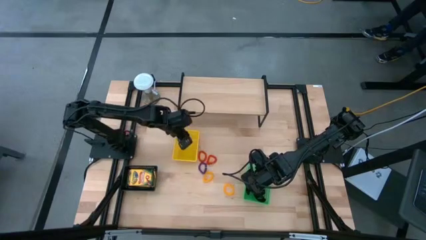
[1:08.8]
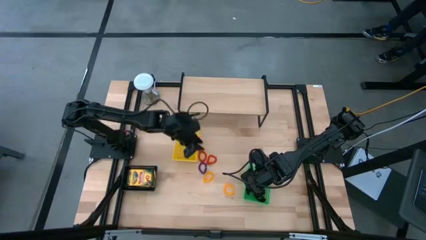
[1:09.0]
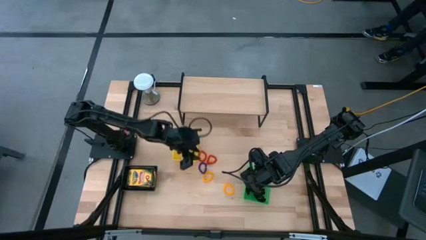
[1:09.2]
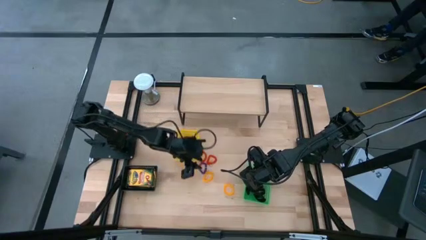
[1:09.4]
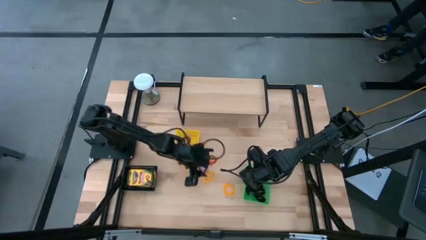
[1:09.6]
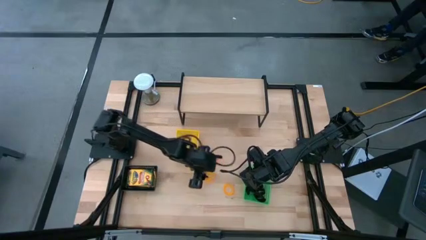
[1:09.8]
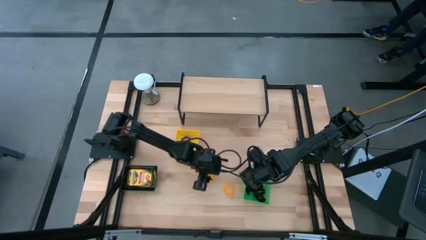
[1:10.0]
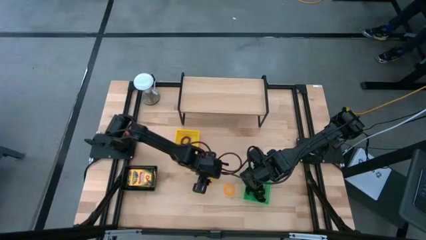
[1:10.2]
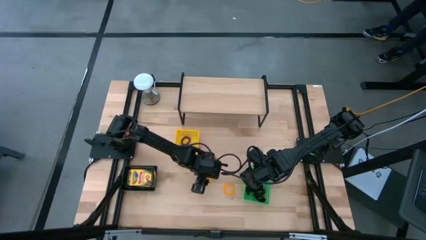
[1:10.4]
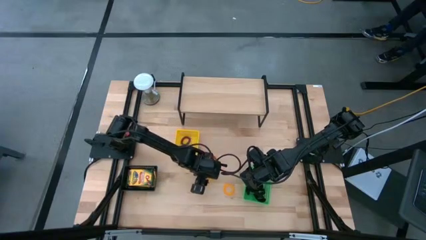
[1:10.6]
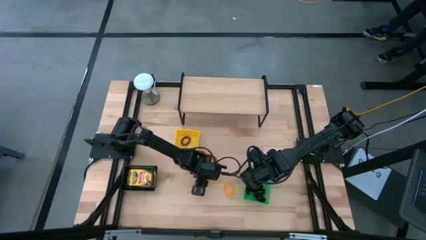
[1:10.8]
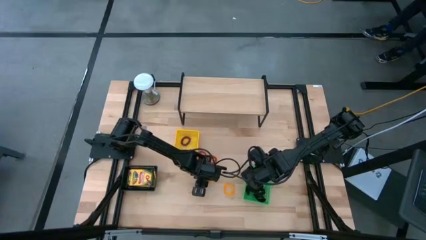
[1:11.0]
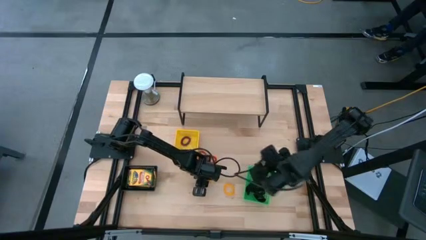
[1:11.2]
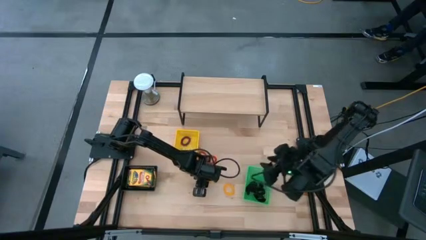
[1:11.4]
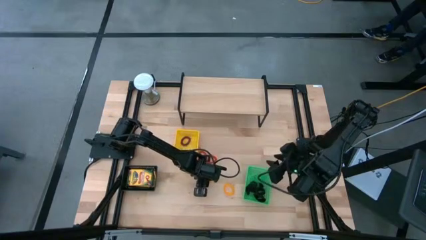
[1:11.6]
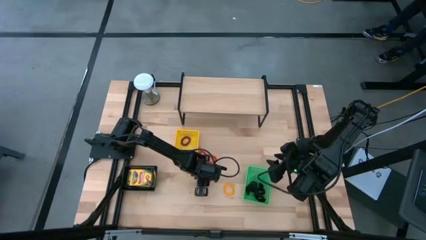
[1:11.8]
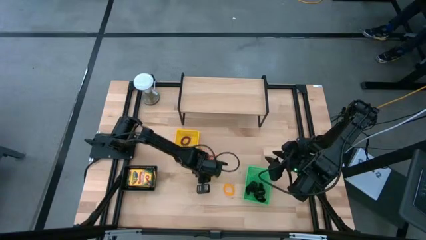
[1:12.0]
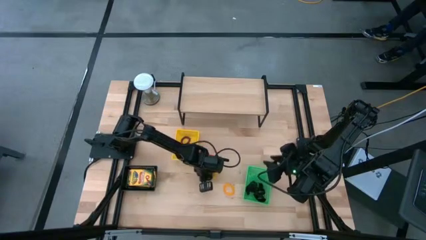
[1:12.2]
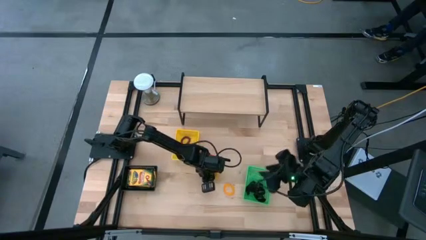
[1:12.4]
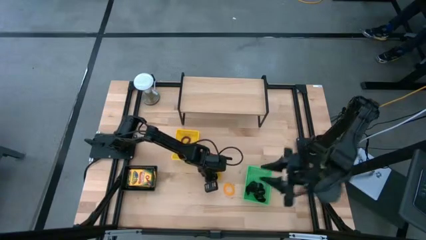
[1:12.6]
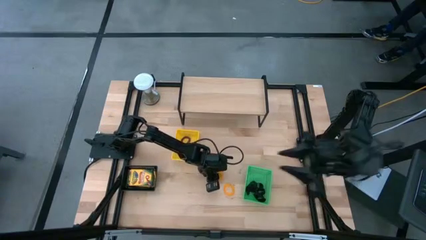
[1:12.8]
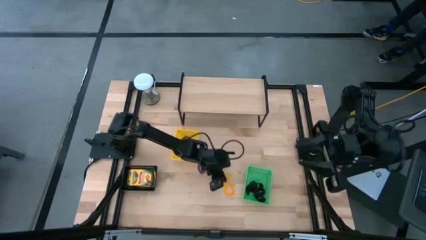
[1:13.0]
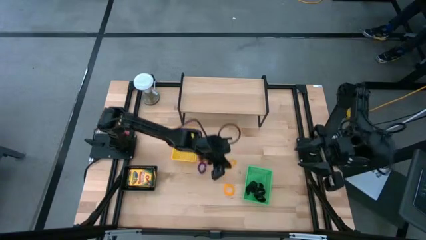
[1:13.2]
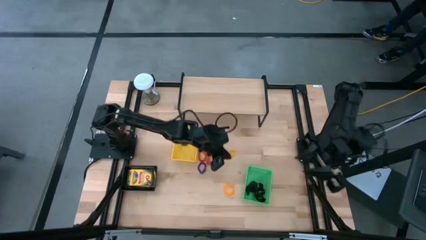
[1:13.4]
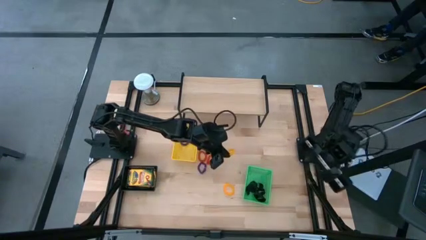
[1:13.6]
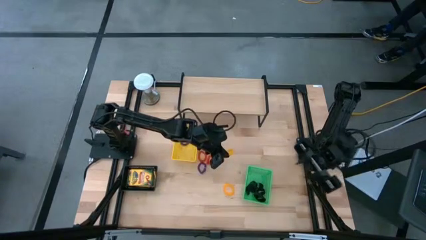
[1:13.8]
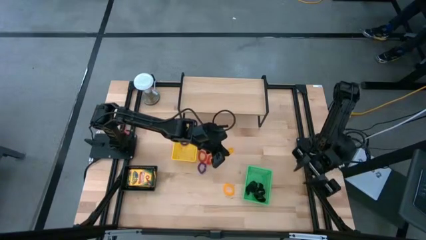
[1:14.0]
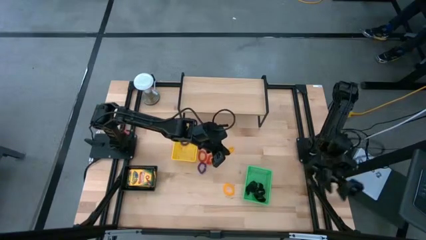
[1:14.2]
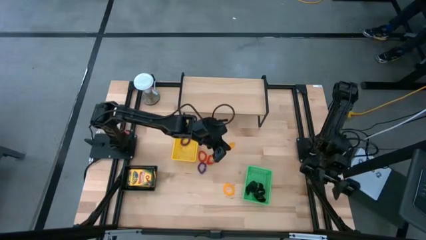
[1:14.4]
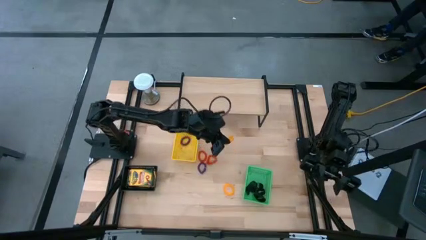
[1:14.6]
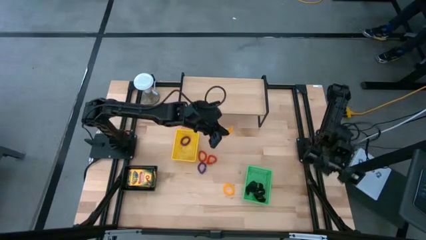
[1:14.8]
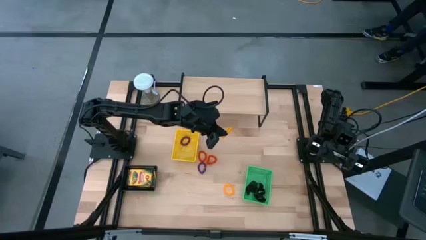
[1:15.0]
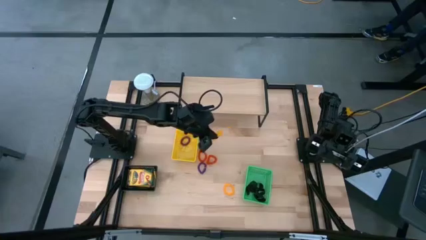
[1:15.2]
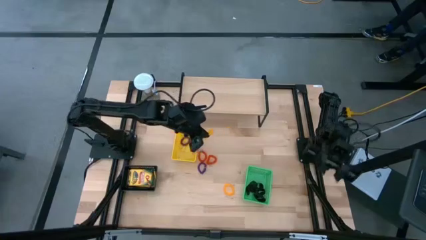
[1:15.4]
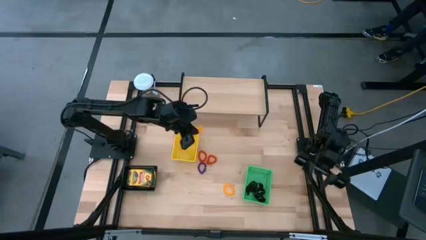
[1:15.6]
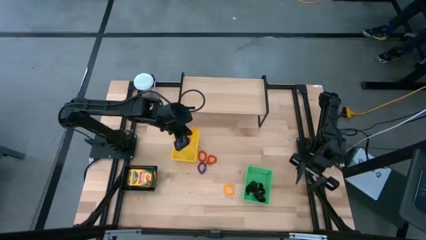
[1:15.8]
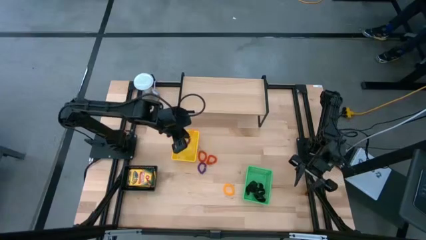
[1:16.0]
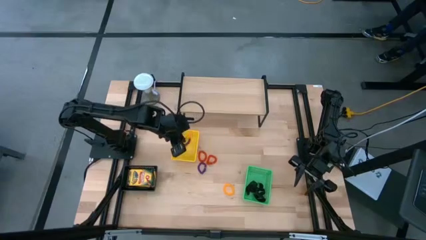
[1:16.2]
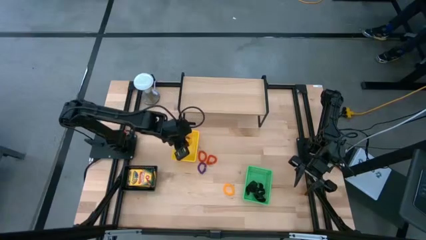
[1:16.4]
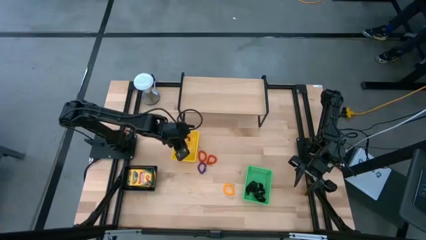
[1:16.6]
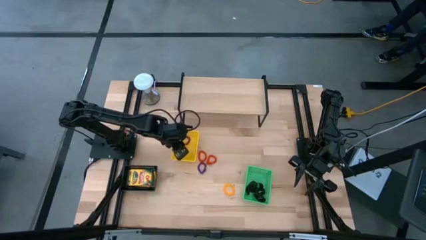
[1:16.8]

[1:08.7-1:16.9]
Task: Pick & Place Office Desk Supplies
Put the yellow spring keychain into the yellow bin

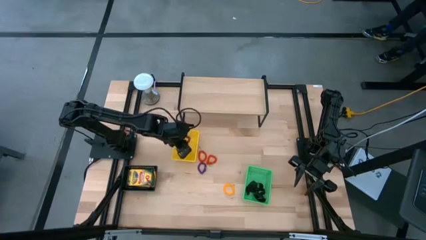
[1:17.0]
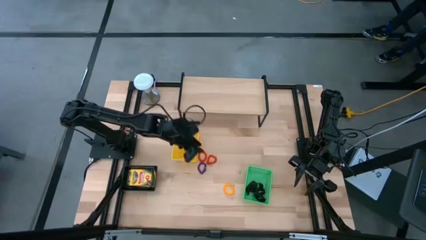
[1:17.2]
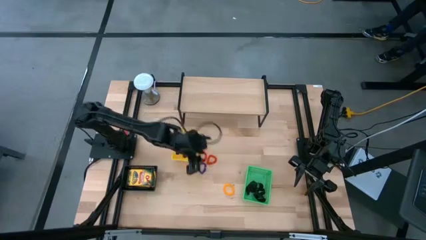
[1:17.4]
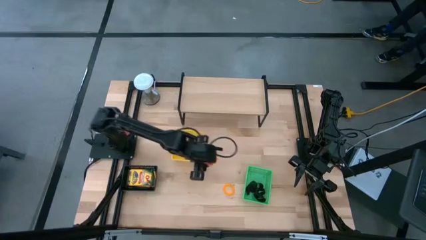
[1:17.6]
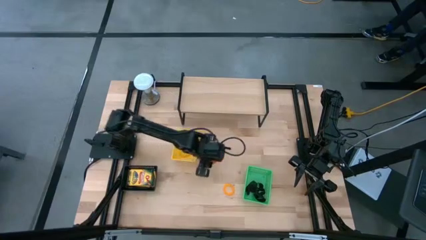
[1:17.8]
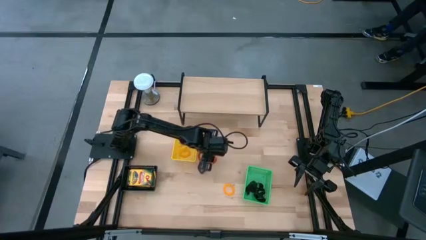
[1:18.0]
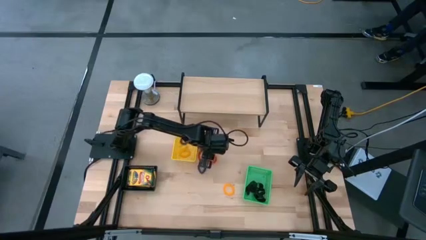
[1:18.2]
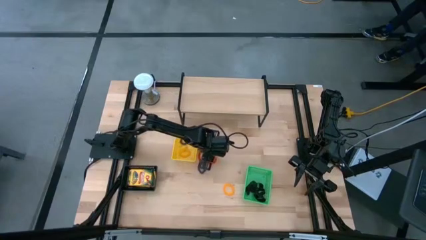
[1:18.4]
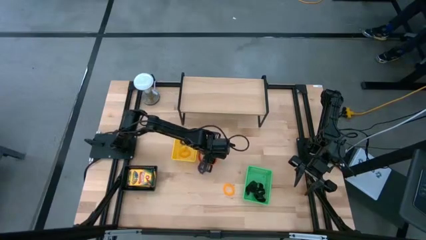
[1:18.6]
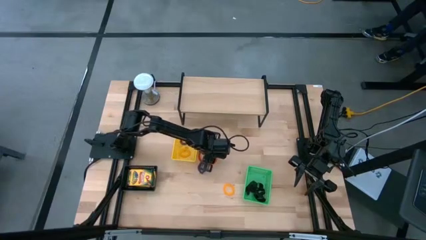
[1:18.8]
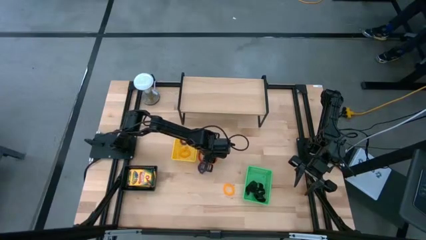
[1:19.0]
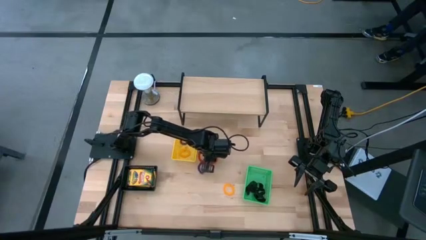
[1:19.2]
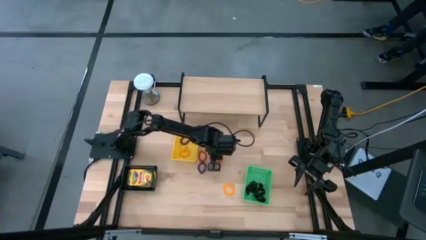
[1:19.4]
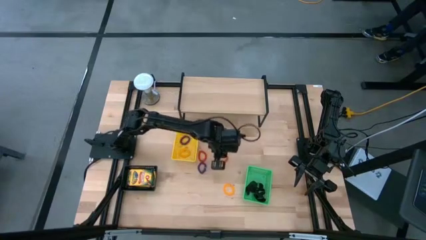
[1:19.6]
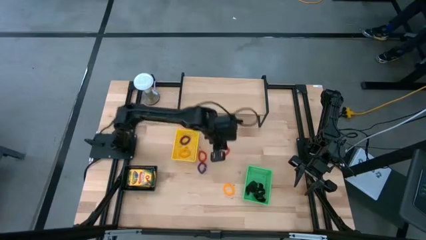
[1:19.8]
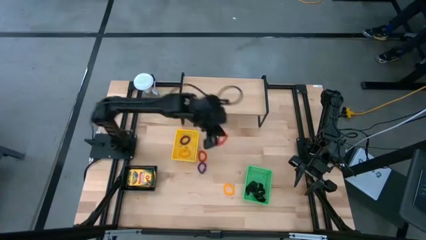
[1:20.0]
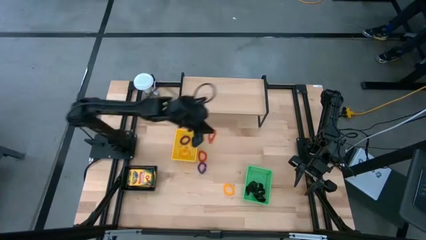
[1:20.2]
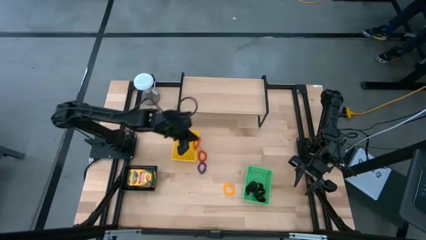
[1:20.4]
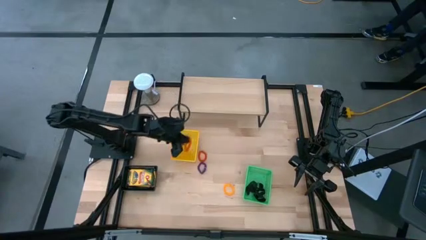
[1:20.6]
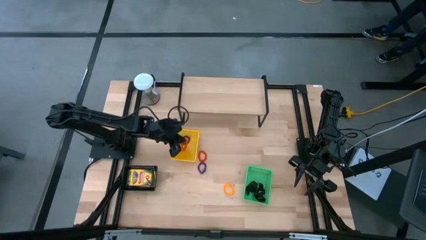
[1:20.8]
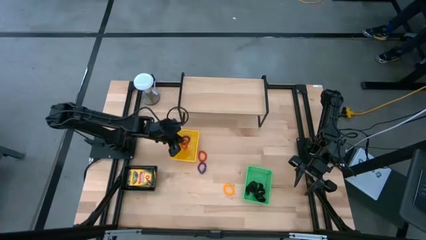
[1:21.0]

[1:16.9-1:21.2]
Put the orange spring keychain into the yellow bin

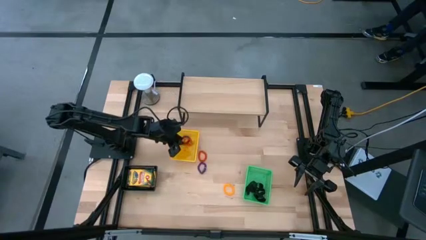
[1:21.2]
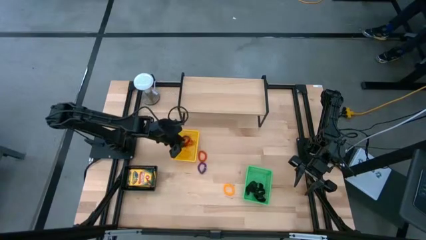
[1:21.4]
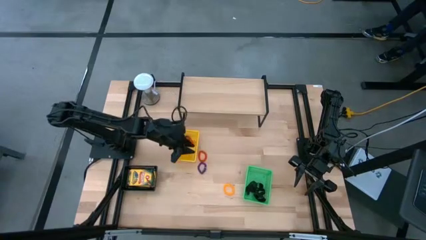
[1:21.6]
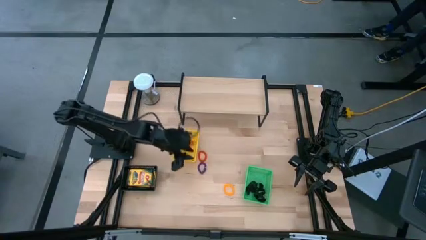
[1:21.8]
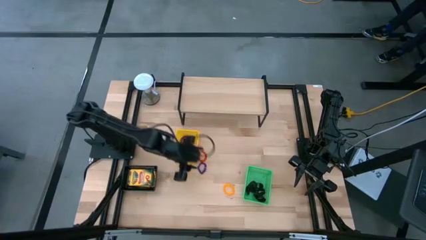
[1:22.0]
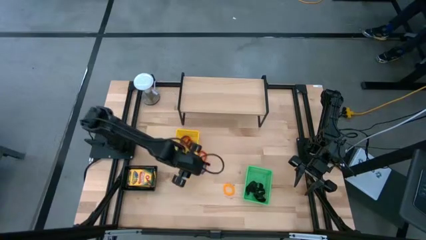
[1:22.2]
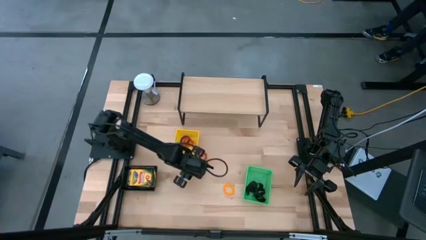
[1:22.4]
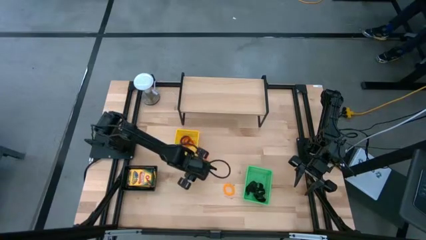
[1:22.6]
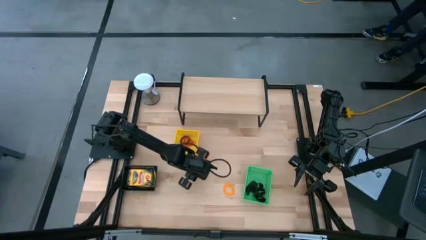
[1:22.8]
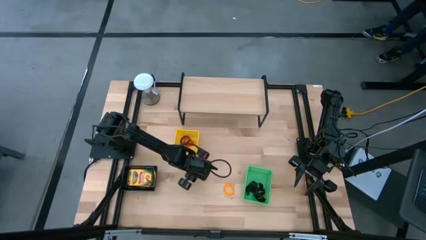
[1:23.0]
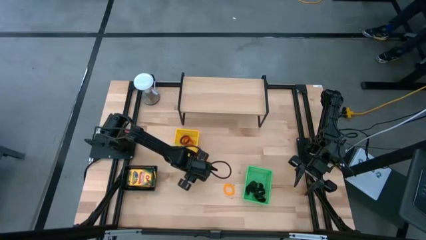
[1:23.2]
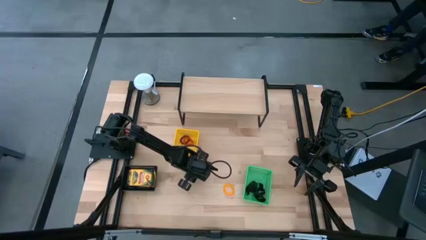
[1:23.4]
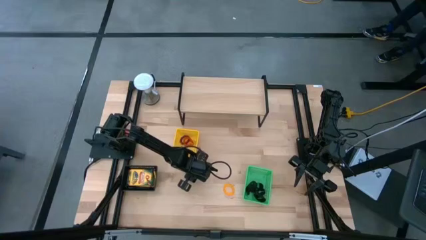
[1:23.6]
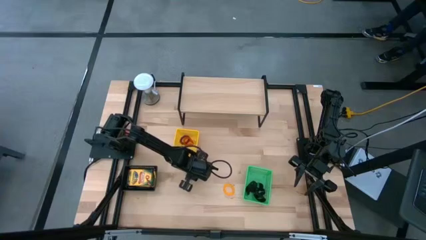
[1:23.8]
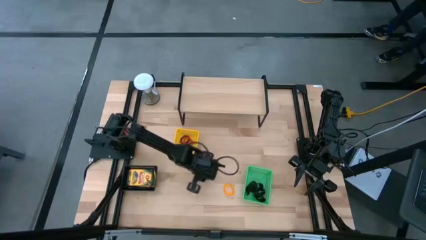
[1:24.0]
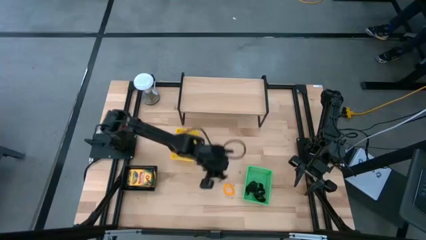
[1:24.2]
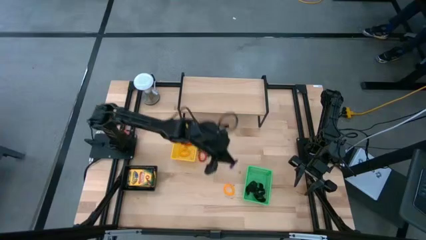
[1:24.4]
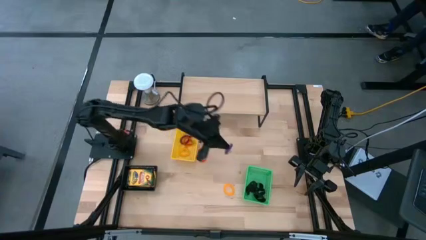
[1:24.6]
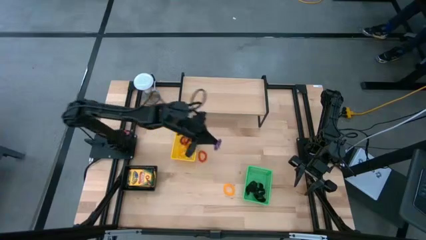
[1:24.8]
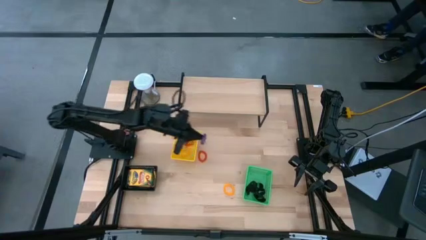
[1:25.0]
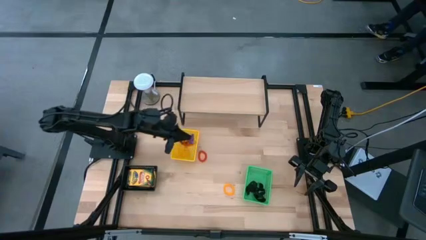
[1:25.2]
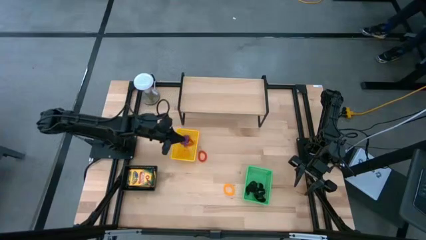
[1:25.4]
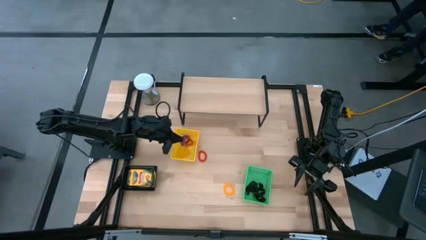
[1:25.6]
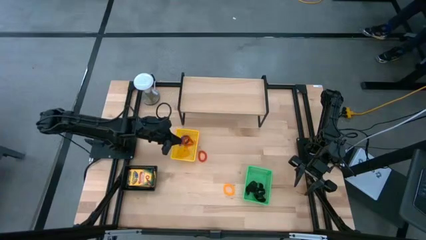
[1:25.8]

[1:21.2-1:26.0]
Put the purple spring keychain into the yellow bin
